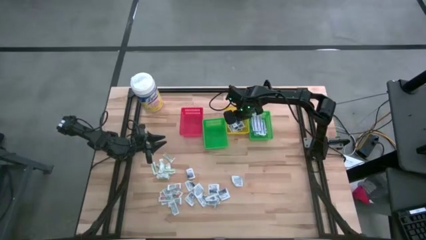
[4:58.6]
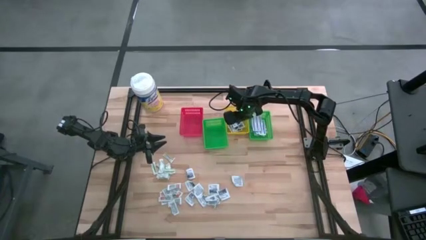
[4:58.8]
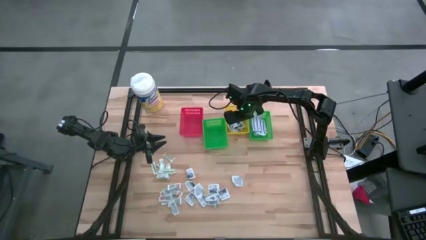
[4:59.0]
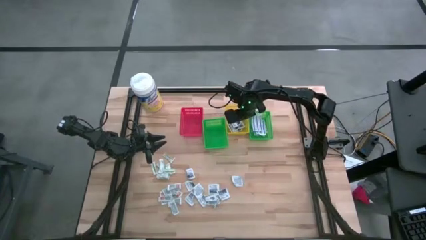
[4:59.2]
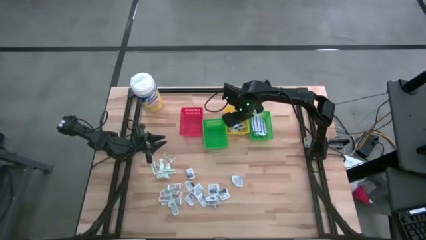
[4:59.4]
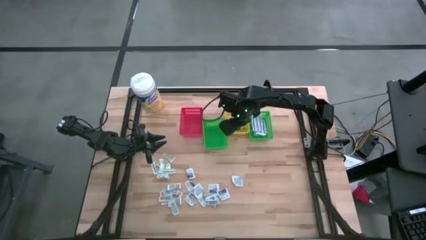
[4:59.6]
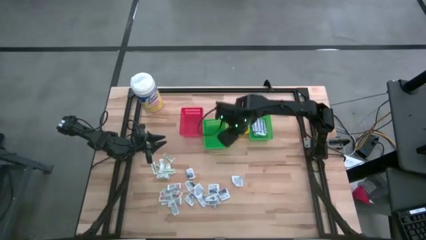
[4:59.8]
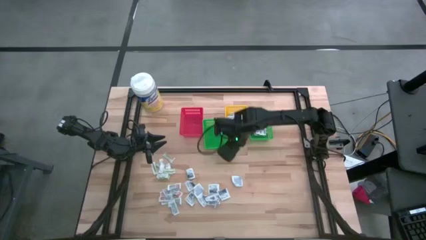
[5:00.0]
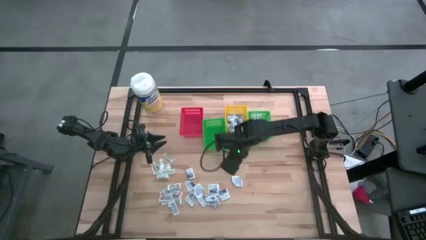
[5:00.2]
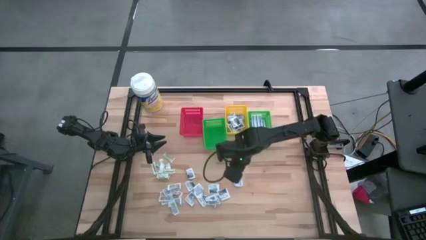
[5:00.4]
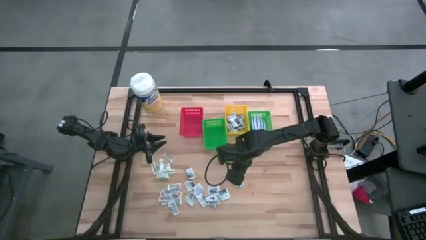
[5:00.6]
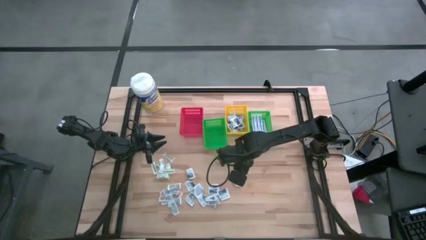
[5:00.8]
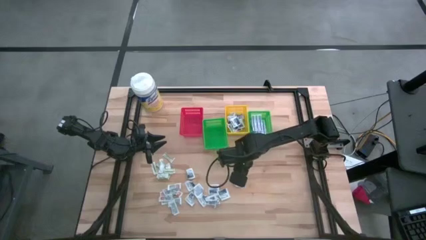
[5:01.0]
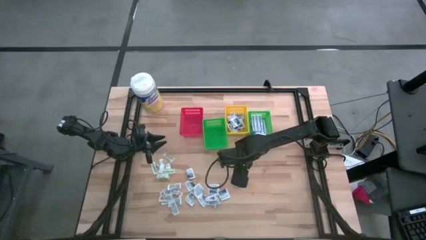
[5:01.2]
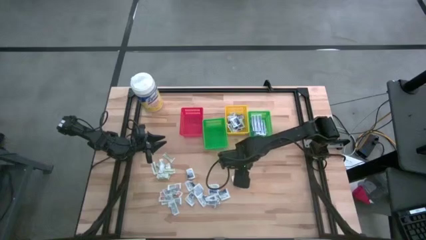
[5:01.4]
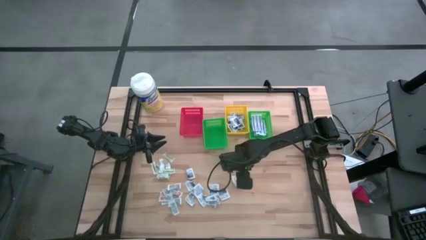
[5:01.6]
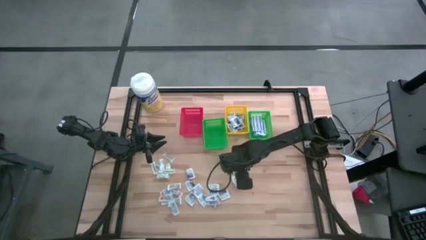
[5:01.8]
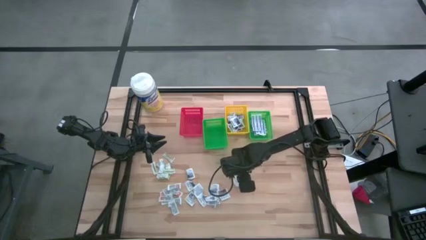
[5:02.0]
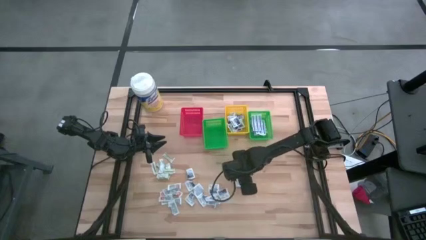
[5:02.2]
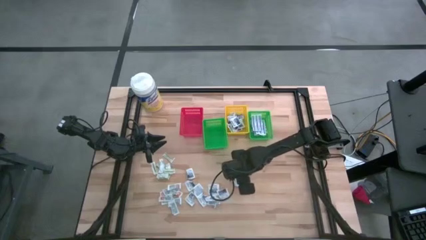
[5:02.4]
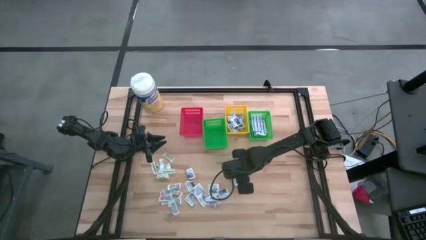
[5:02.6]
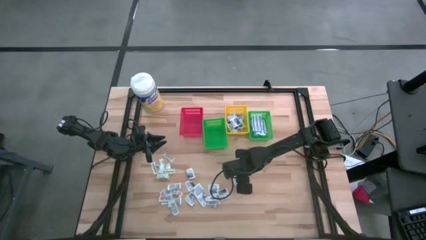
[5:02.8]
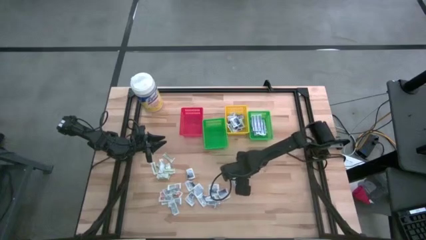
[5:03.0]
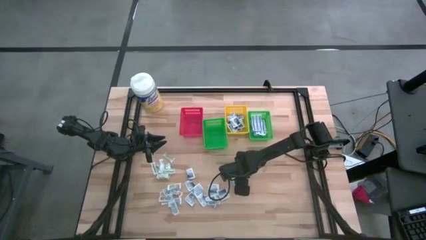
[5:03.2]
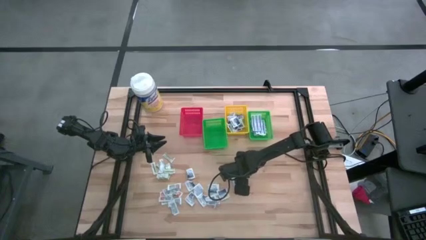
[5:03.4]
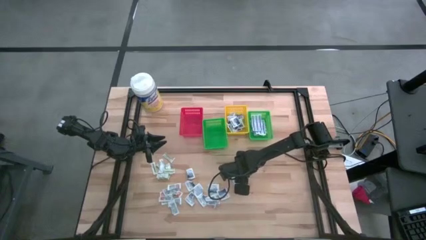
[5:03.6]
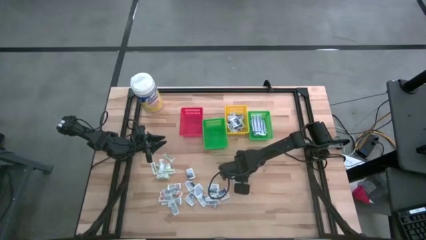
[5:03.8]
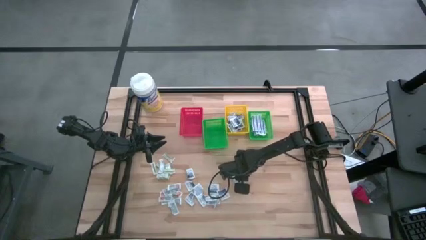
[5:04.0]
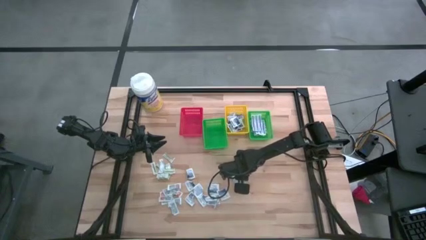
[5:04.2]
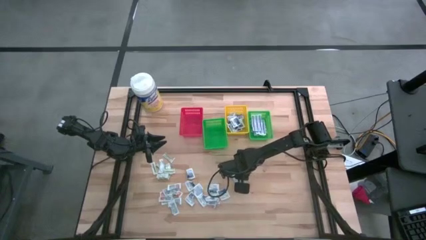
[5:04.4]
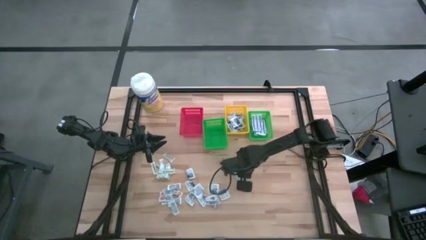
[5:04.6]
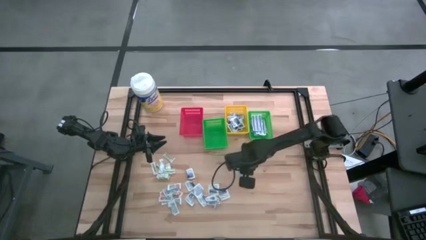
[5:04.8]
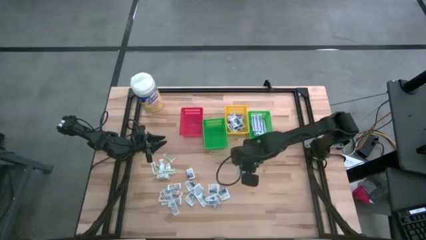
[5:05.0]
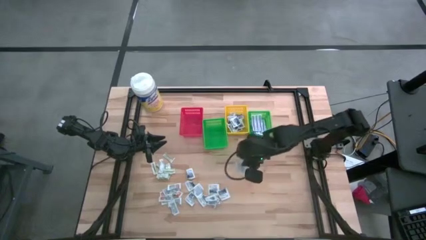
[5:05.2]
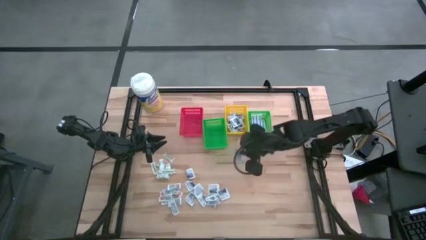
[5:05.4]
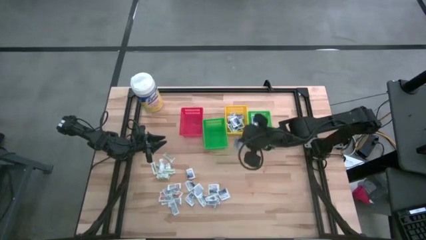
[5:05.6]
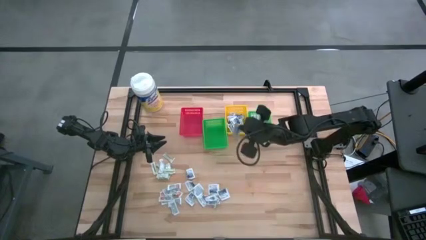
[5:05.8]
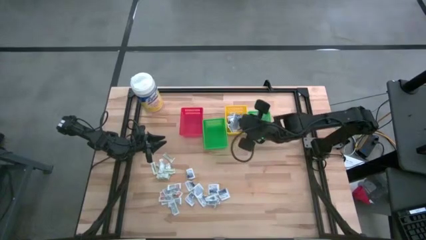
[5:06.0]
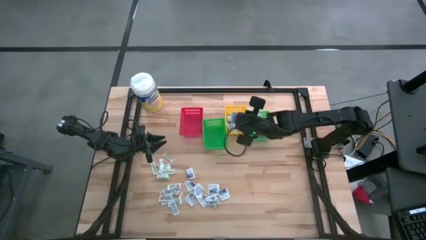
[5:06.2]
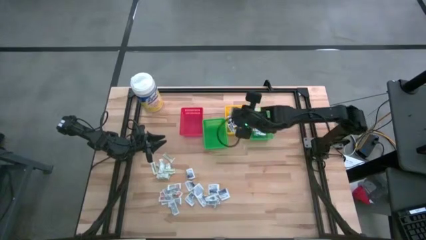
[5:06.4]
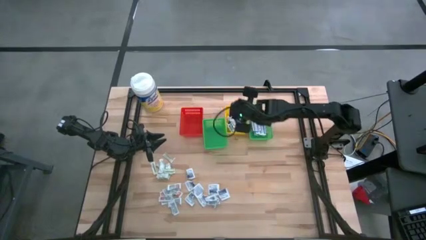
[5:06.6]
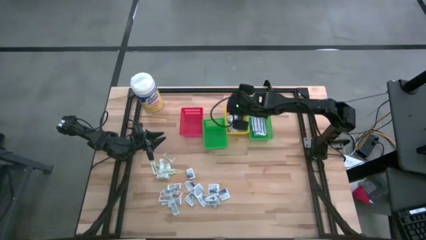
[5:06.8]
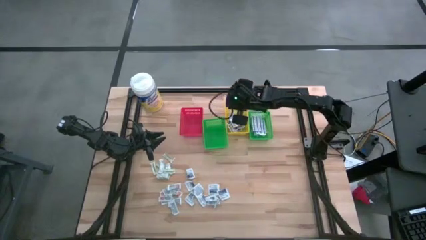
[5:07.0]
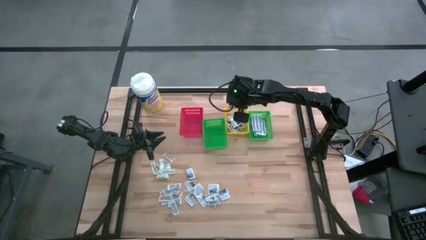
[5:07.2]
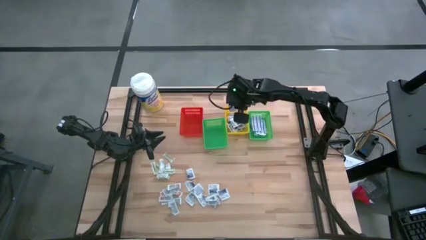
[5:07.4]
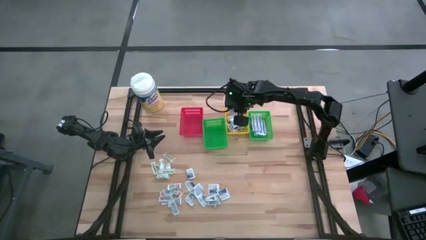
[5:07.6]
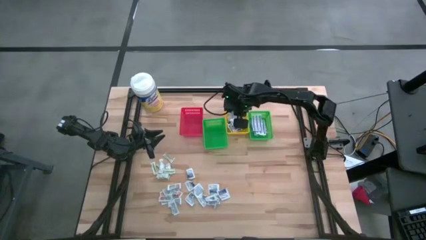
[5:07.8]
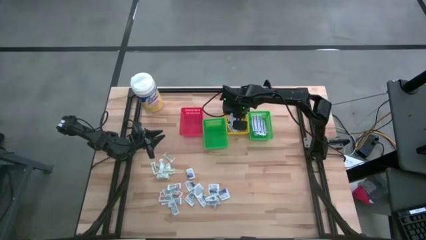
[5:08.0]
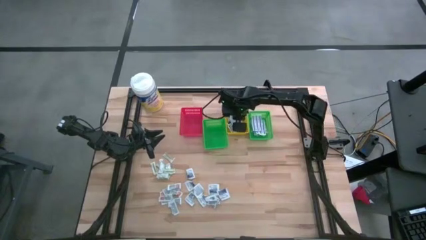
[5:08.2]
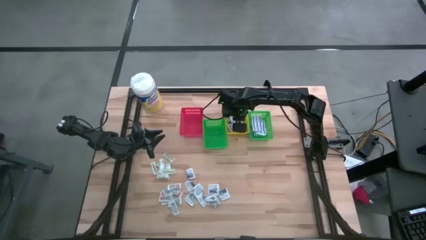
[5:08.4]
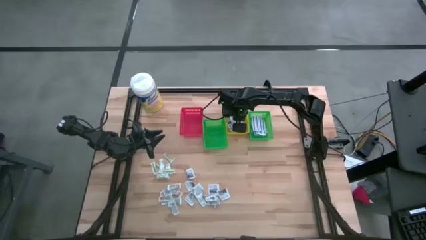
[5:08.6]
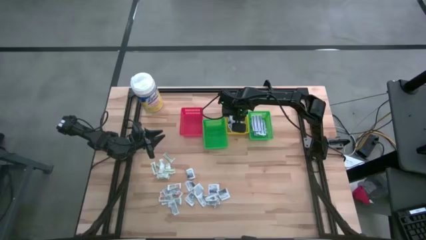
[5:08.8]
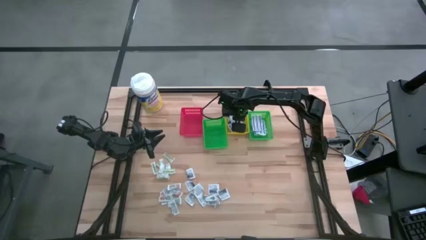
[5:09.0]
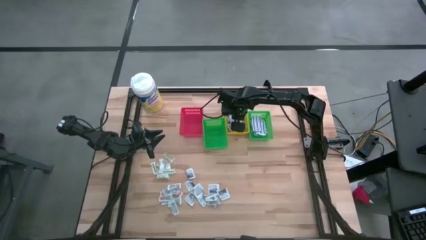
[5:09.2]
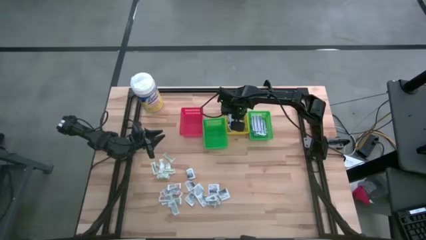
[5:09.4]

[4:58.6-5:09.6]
Task: Pick & Place First Aid Supplies
Put the alcohol pad into the yellow basket

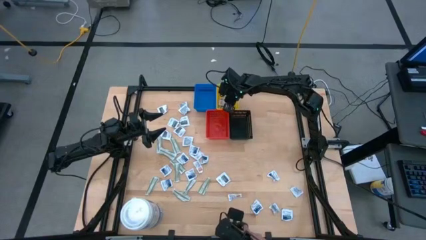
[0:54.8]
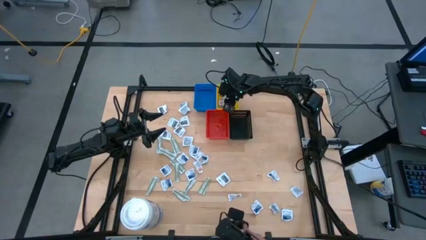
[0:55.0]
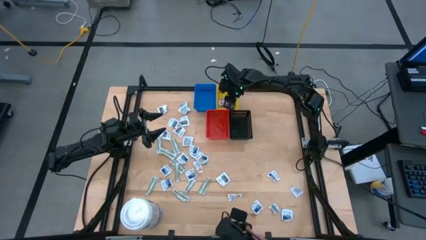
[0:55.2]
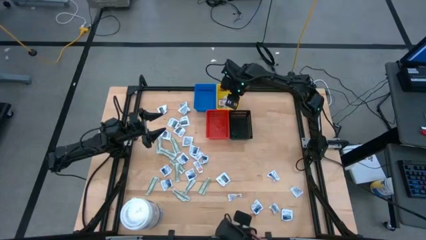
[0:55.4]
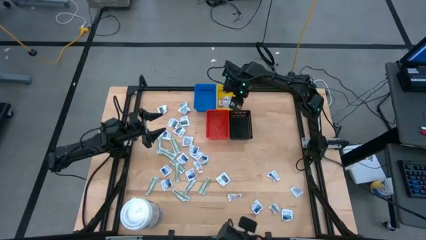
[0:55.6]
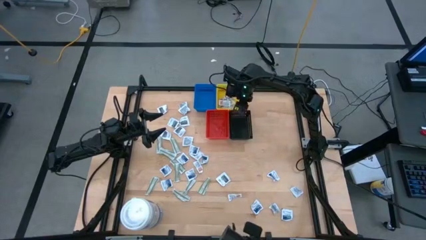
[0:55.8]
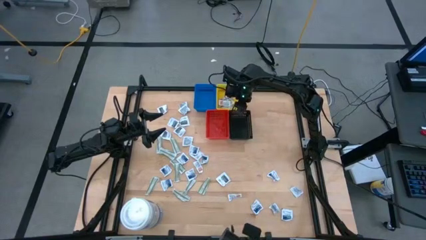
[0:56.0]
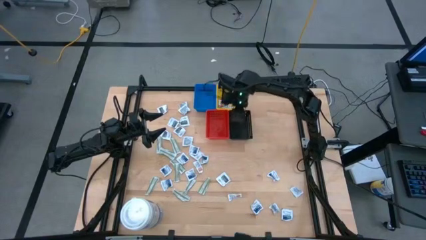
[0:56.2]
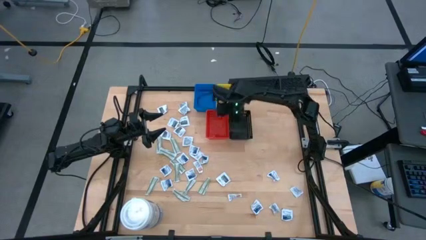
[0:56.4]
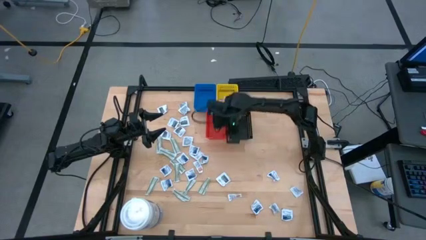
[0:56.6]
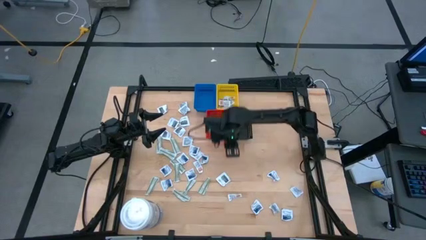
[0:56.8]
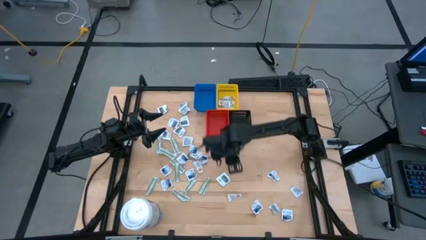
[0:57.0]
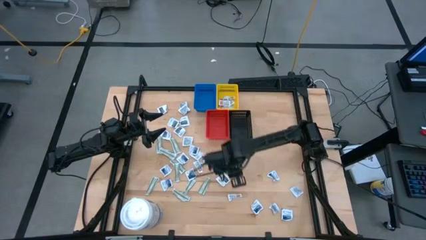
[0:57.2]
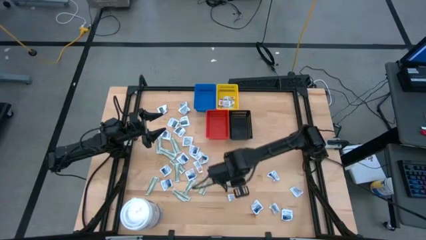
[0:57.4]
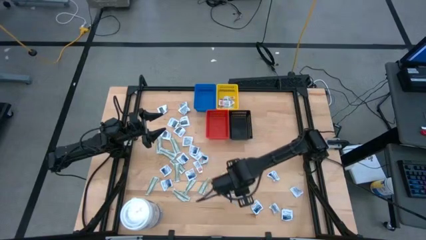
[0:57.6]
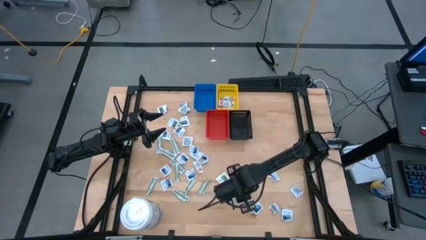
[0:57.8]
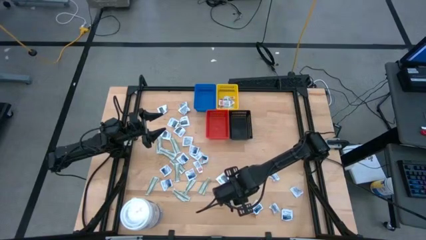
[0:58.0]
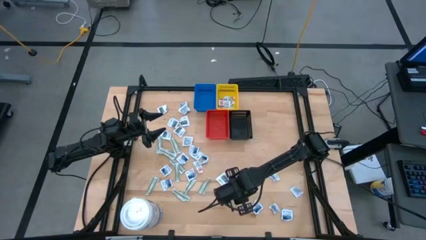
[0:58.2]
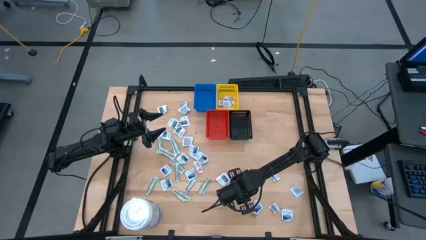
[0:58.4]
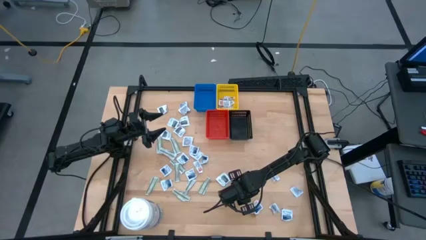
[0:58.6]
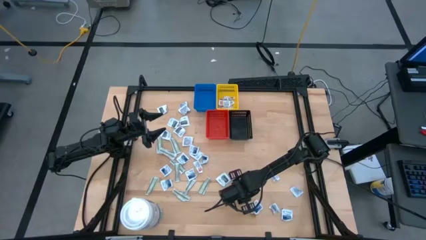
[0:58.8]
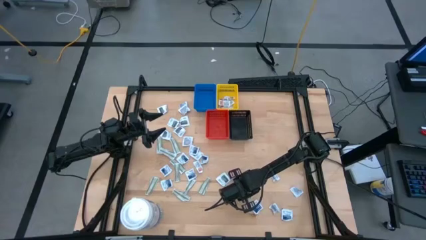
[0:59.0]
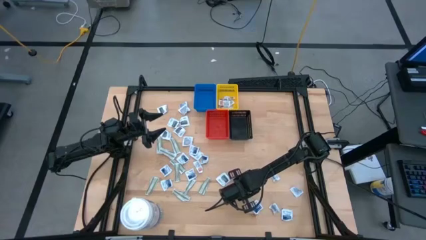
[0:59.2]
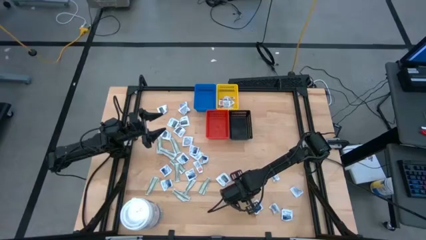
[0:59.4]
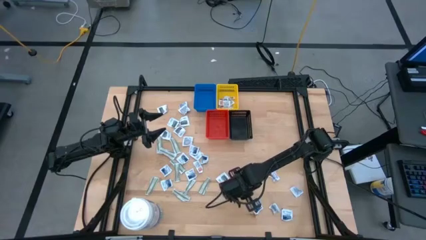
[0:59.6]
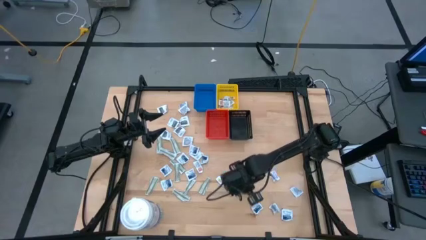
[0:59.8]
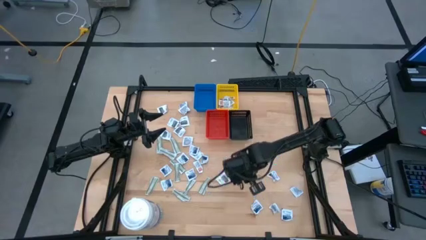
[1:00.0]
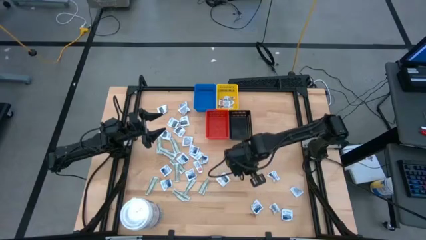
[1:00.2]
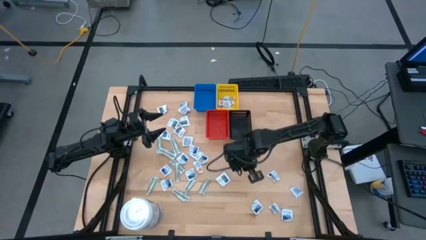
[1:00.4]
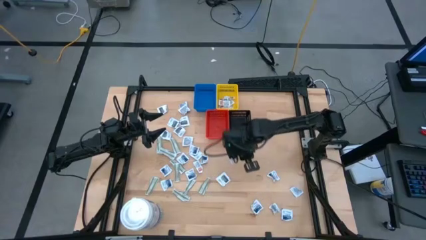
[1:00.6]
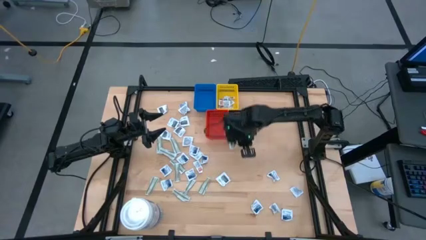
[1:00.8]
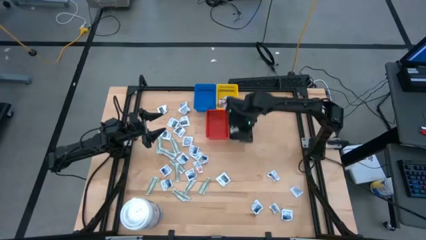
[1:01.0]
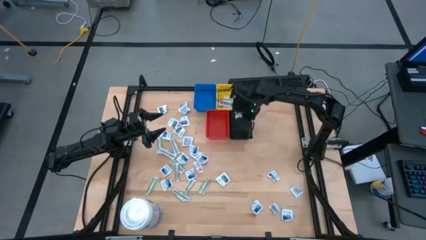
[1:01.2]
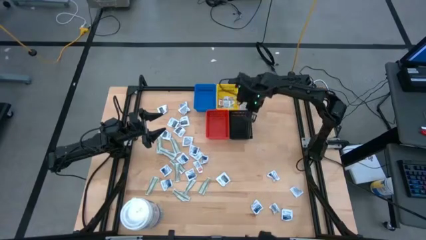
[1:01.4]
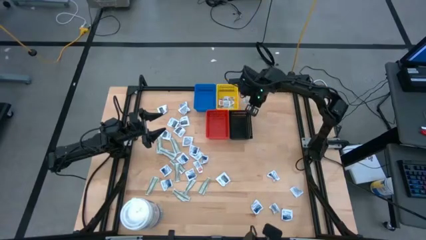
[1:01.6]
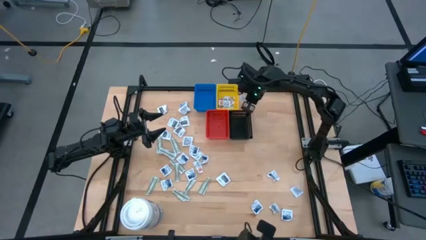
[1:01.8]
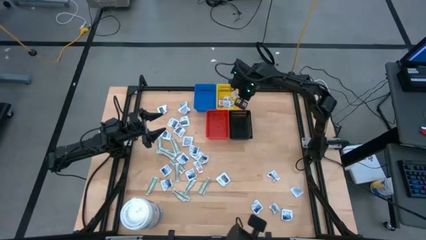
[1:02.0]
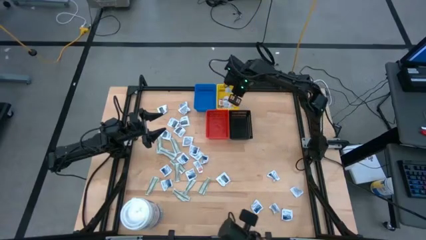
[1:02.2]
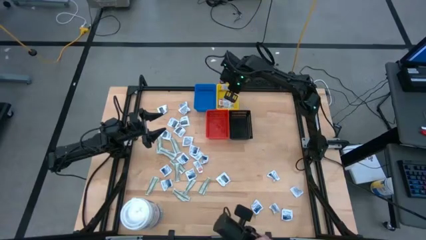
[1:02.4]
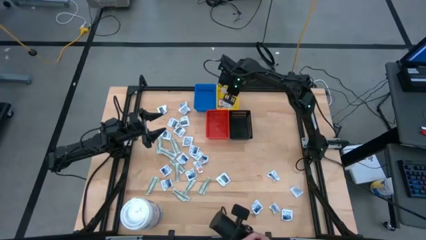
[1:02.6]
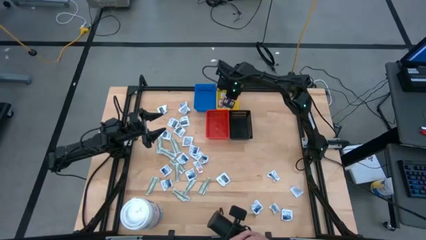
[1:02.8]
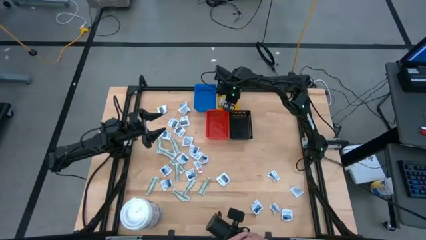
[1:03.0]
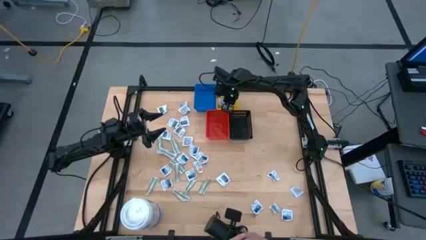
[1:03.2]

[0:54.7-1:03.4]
Task: Pick & Place First Aid Supplies
Put the bottom ointment pack into the yellow bin
